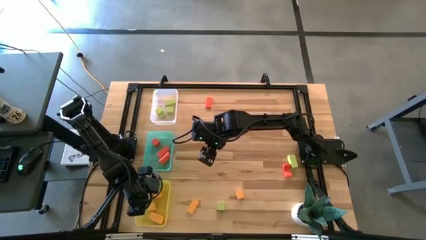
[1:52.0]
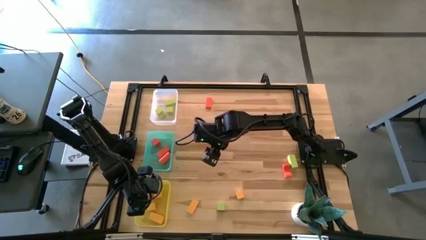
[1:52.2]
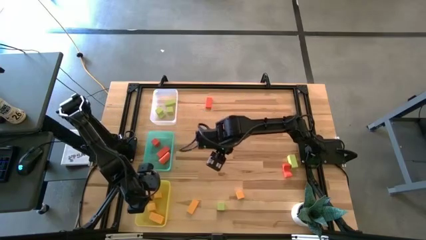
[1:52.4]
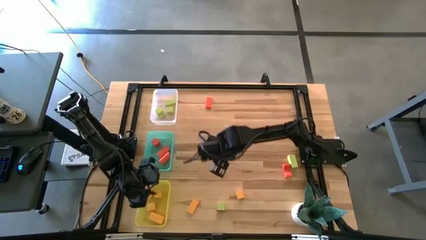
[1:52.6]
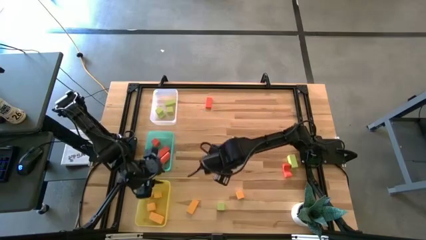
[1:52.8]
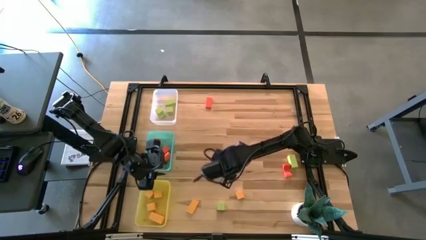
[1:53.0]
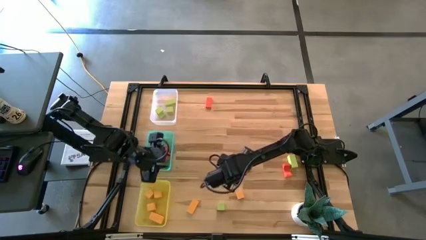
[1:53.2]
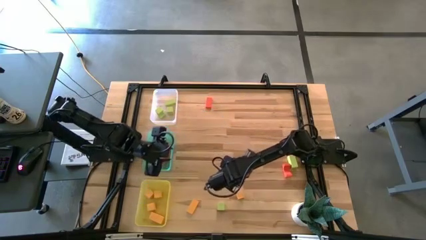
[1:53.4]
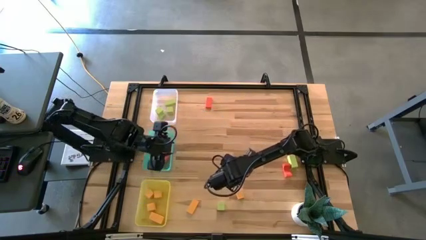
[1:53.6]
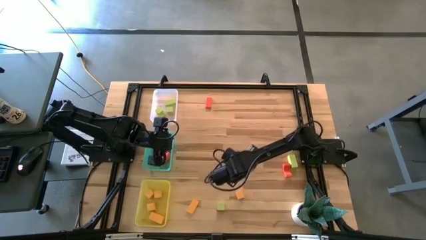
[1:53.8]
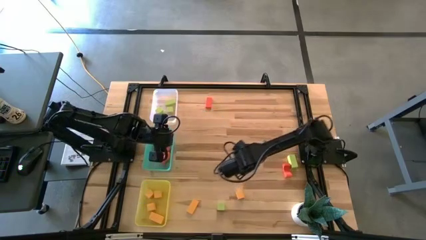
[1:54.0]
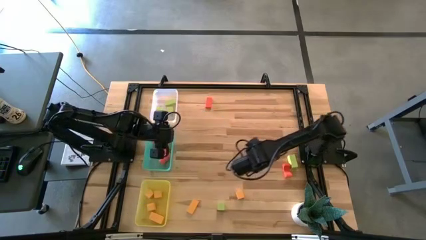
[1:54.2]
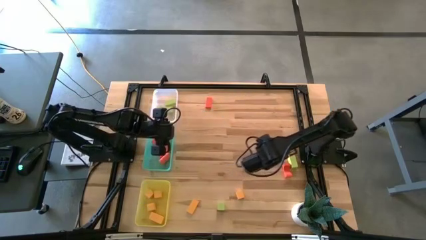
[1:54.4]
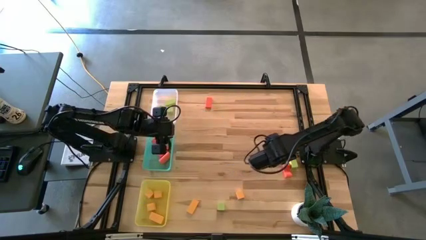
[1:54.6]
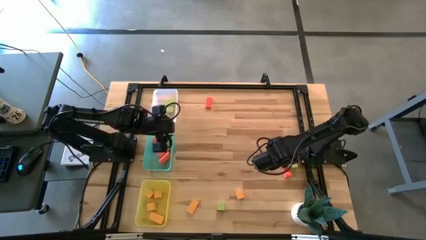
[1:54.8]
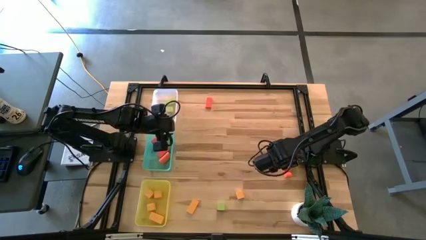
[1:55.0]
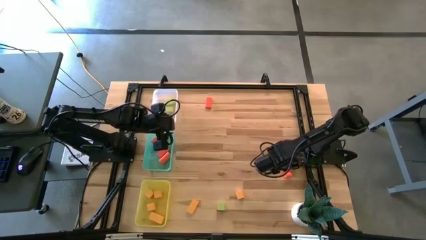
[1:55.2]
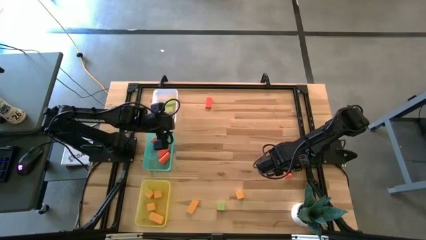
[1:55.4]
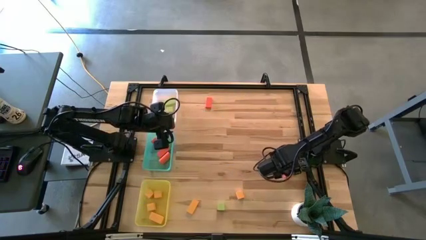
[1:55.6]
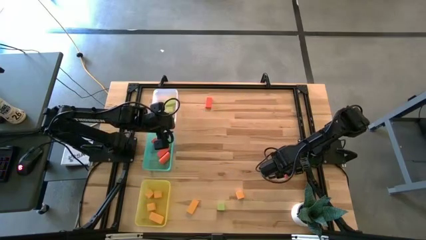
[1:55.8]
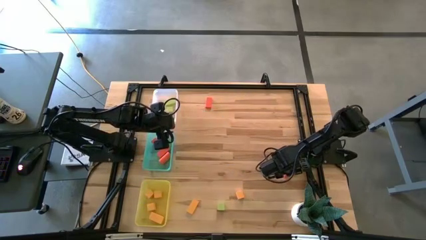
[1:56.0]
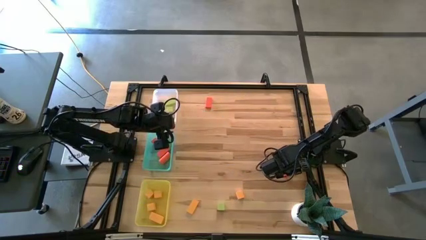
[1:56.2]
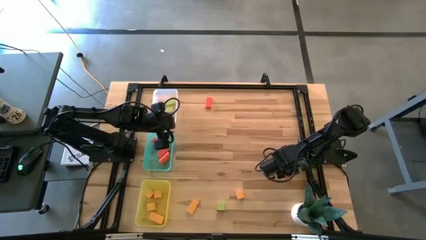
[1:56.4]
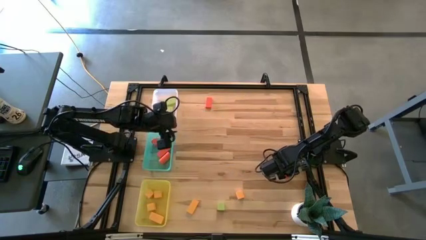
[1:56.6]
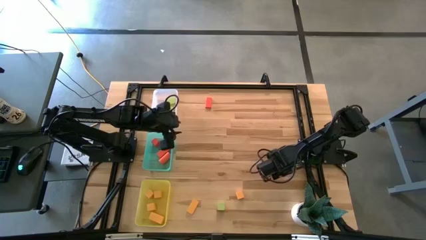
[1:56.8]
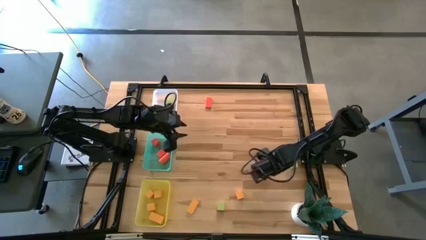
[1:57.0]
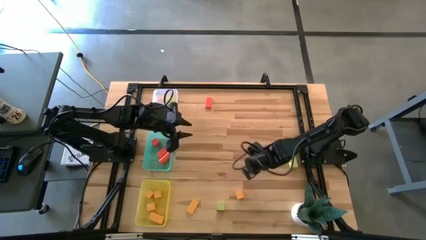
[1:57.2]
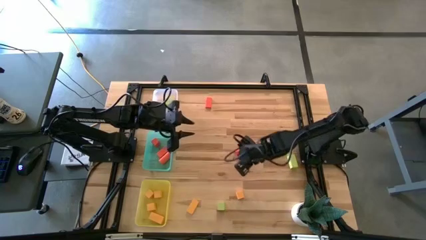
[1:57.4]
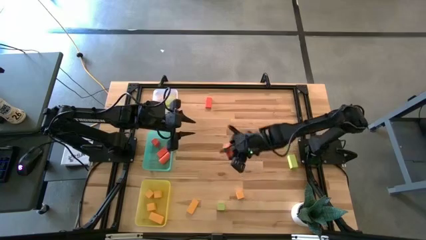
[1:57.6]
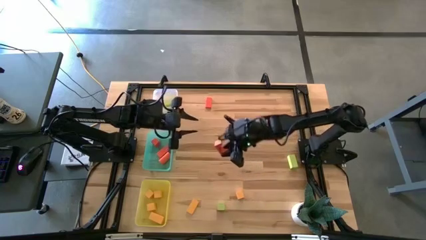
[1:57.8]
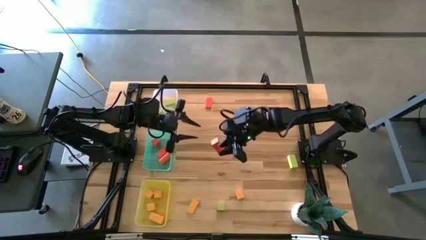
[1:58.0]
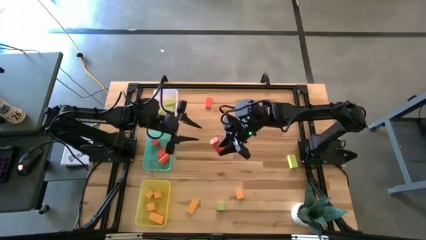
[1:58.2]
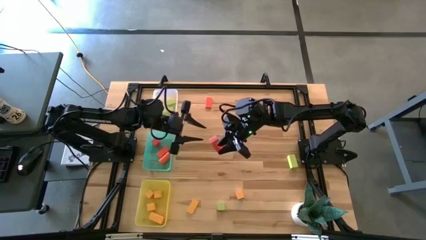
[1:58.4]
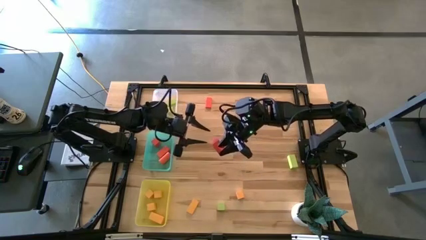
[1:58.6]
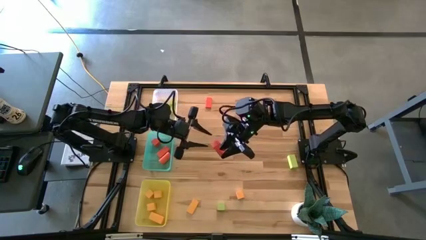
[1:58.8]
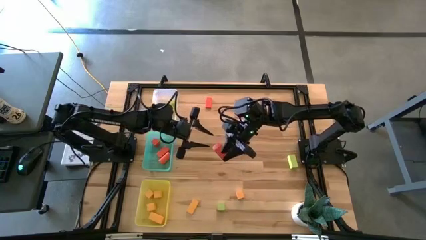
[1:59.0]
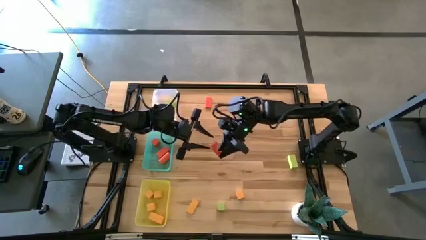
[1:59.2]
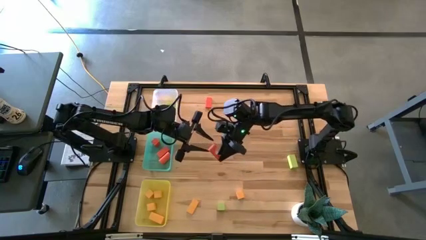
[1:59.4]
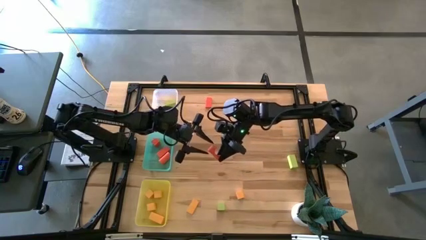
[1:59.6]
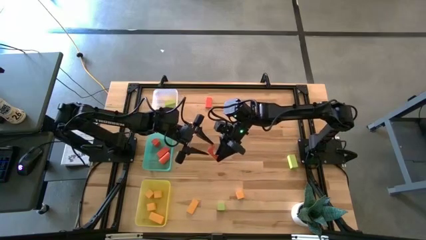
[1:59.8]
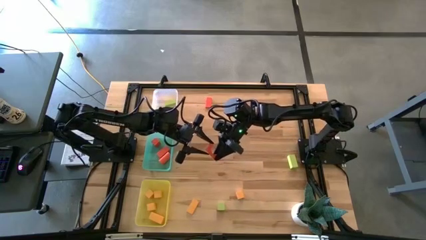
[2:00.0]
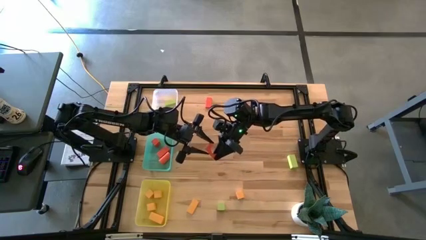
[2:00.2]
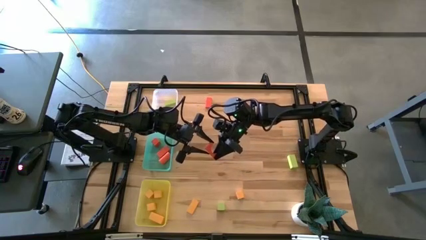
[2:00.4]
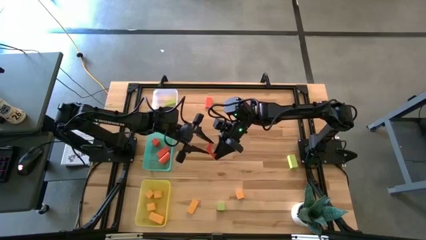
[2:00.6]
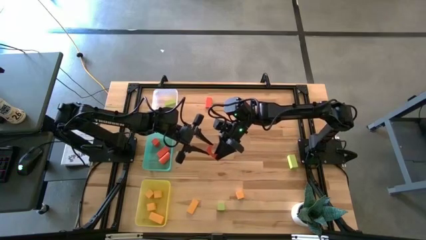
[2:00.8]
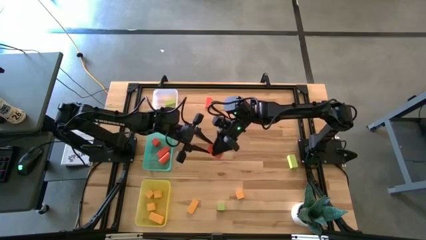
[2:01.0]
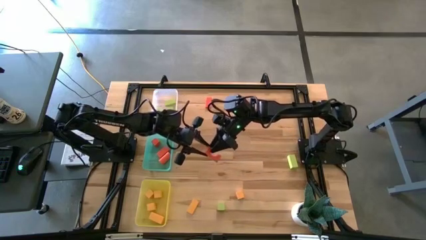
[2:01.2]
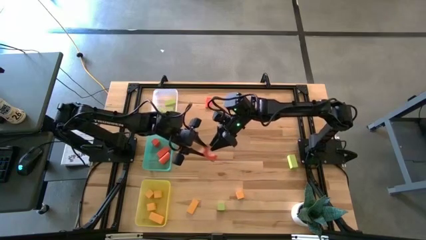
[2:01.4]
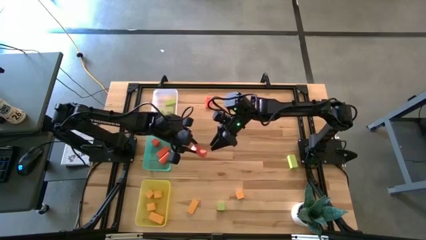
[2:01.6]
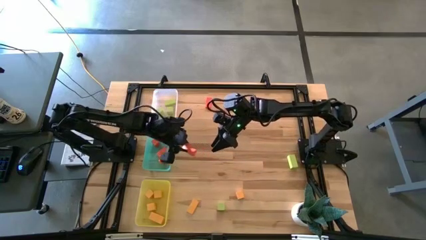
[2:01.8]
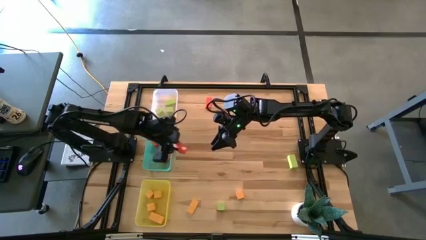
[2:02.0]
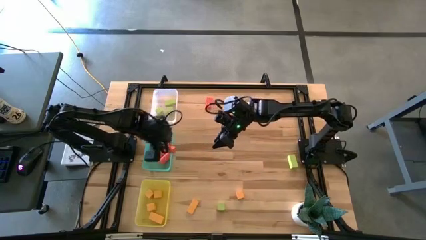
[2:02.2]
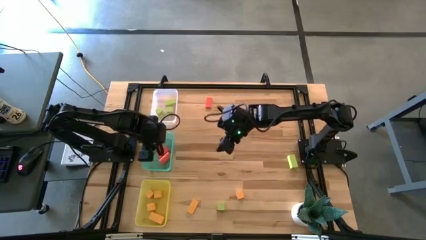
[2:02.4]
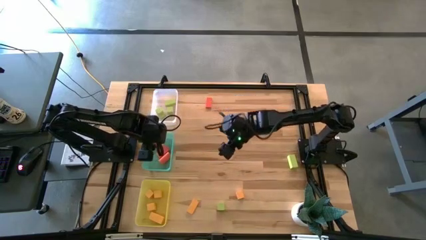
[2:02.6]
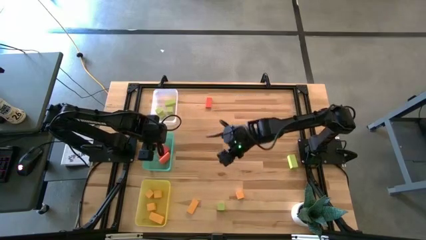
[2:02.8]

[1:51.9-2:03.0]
Task: Sort & place blocks by color
Put the orange arch block into the blue bin

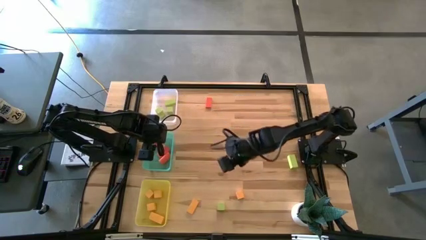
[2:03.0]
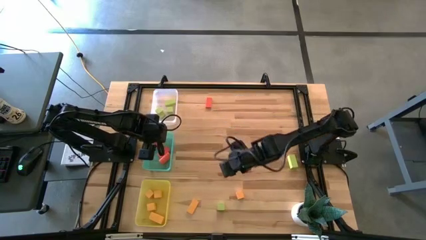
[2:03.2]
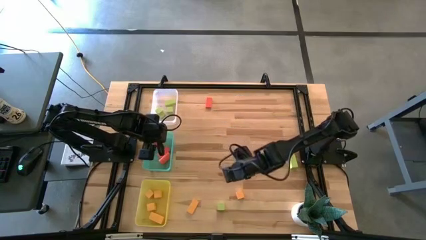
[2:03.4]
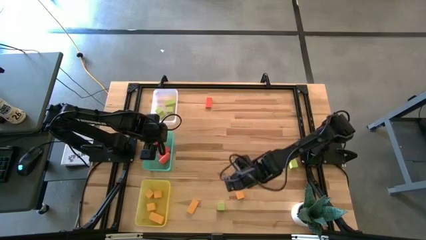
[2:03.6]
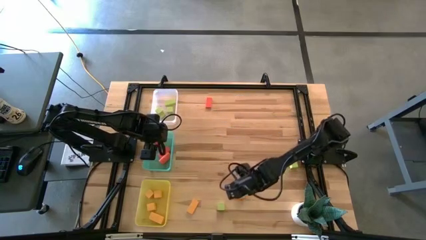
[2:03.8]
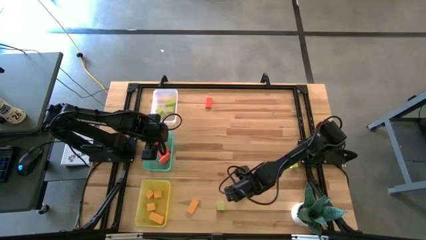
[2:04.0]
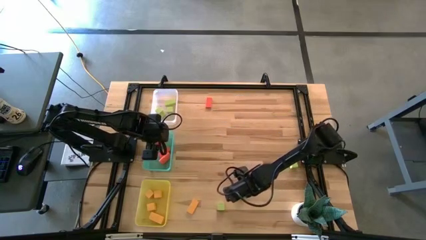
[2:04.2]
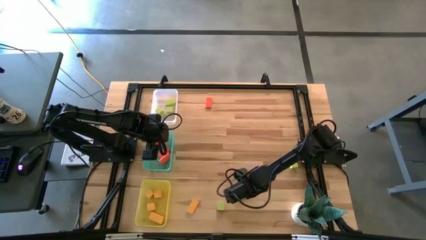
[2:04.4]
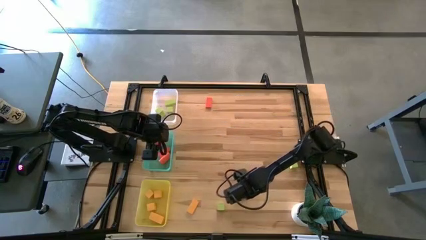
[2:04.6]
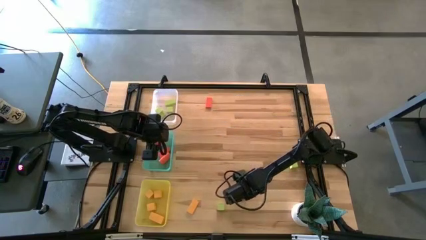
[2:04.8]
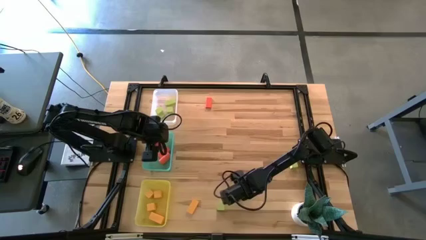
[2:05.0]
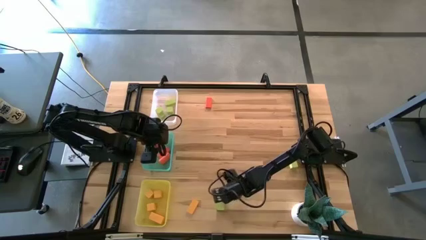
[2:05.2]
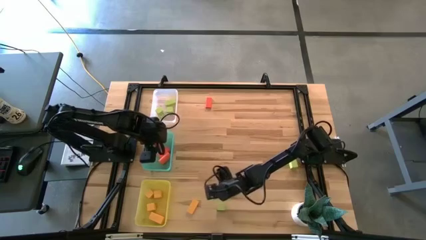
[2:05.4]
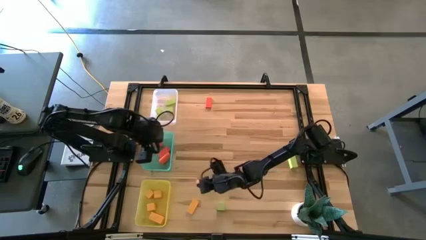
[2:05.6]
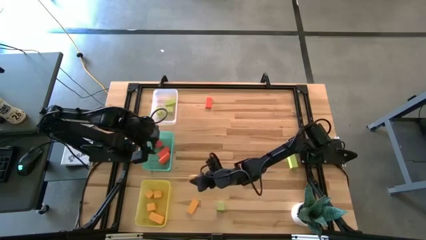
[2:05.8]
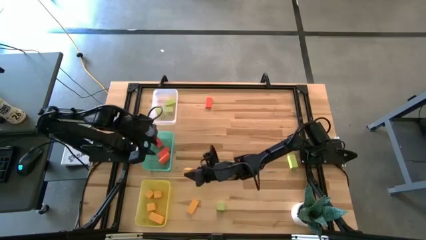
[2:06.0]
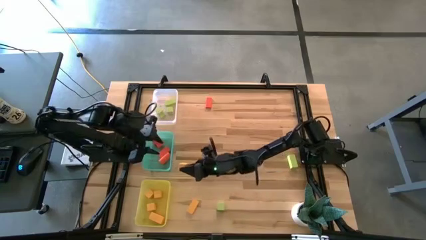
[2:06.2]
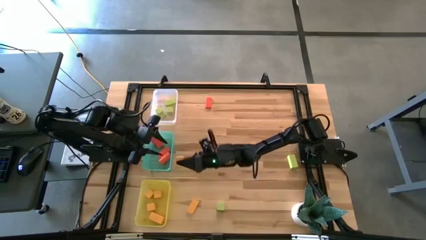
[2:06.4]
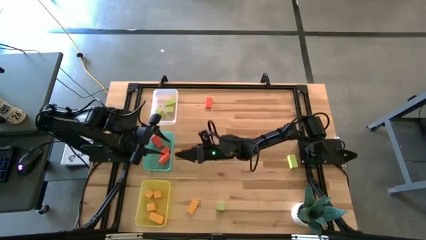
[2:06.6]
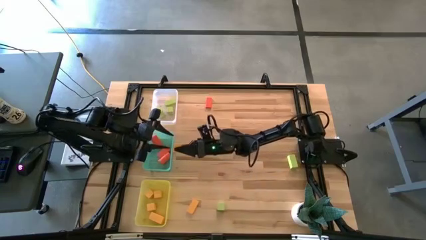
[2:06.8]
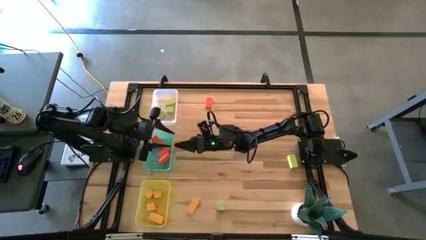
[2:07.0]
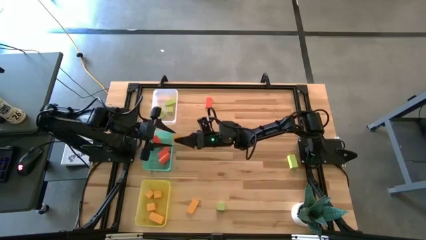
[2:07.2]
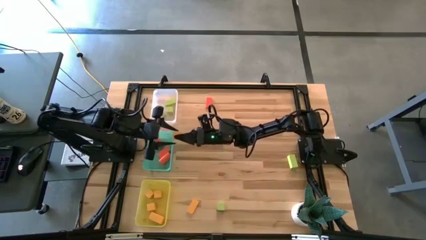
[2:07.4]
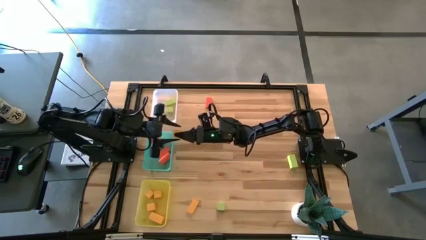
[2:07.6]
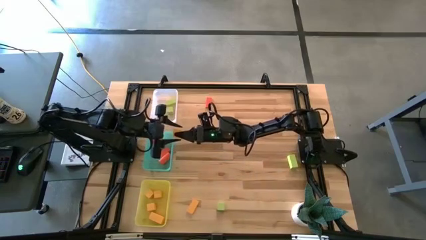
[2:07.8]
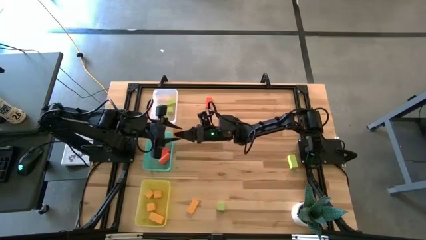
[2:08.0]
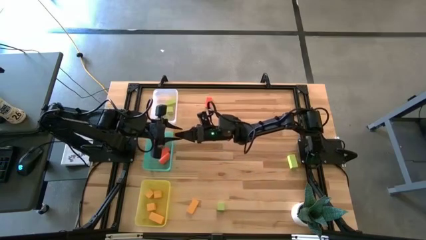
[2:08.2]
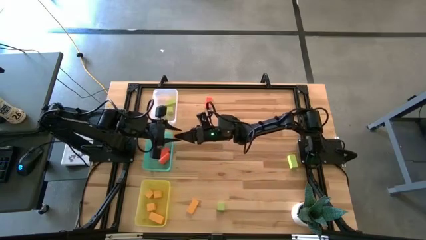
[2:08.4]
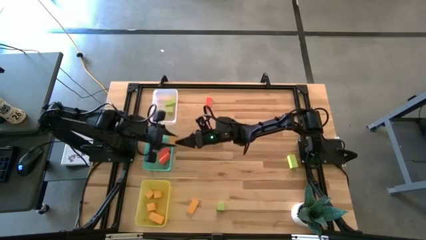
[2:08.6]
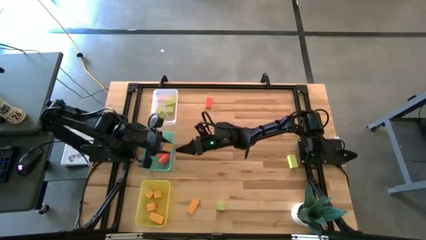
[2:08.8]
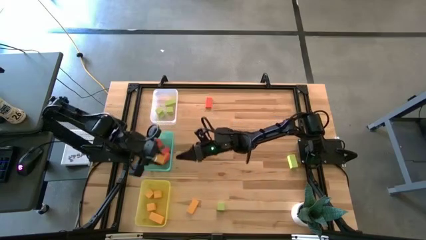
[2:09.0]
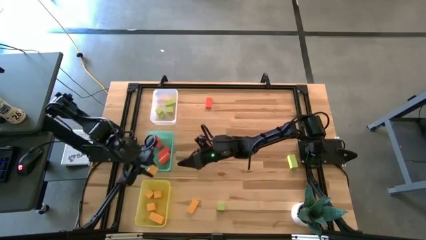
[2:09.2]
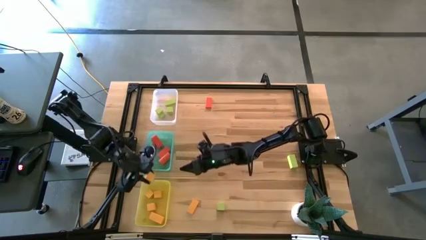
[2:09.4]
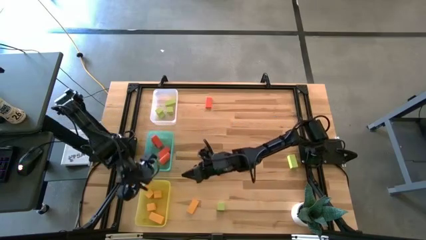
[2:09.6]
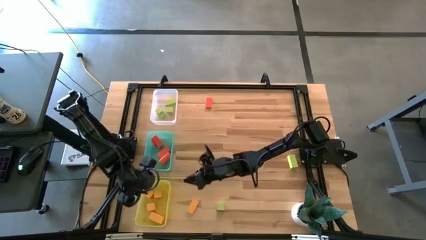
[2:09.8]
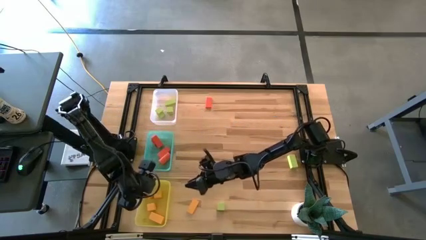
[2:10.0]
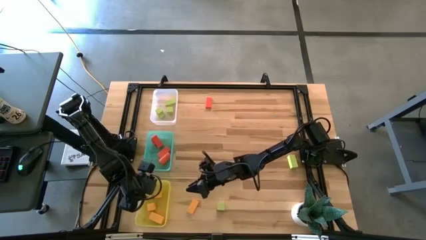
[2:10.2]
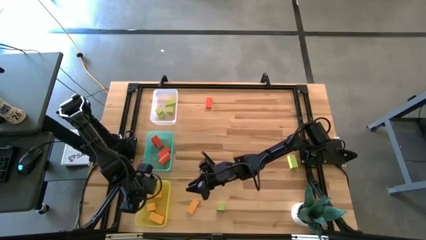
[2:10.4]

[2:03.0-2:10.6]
Put the yellow cube block into the yellow bin
